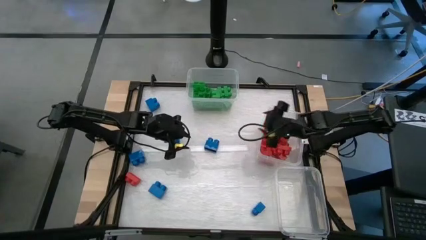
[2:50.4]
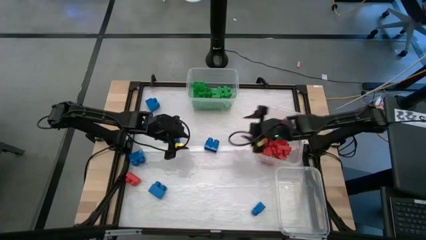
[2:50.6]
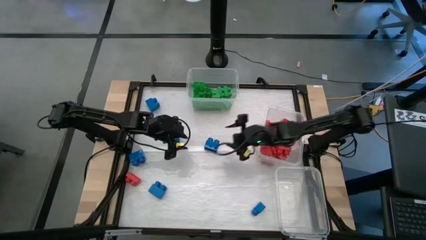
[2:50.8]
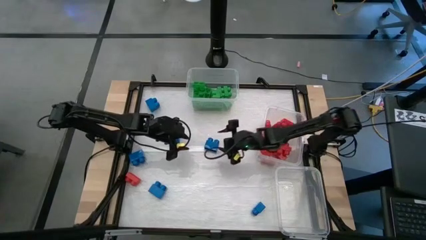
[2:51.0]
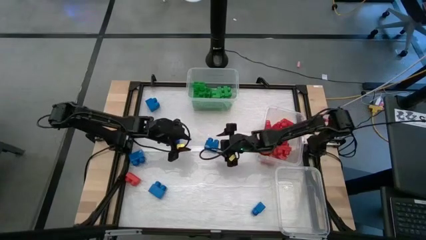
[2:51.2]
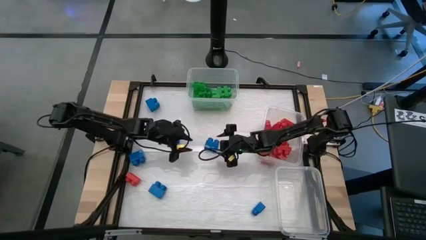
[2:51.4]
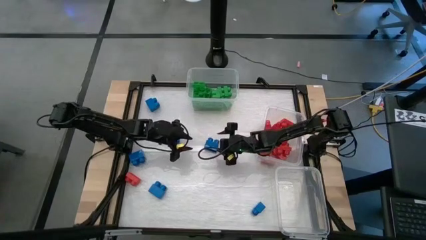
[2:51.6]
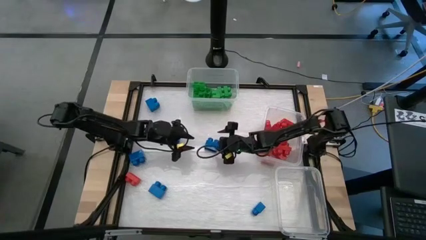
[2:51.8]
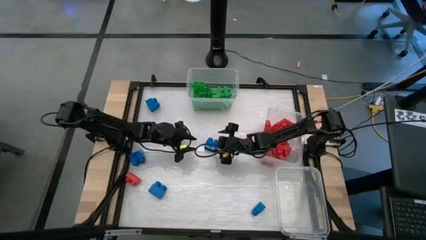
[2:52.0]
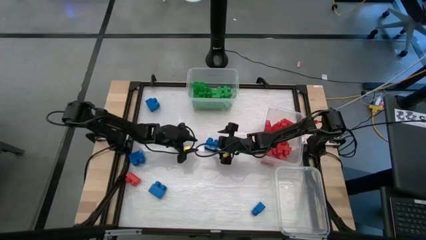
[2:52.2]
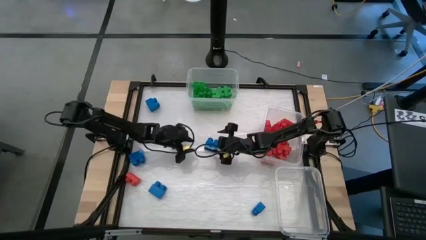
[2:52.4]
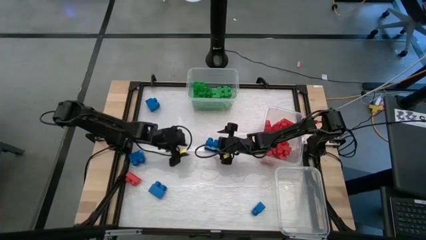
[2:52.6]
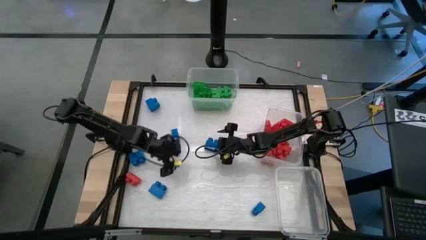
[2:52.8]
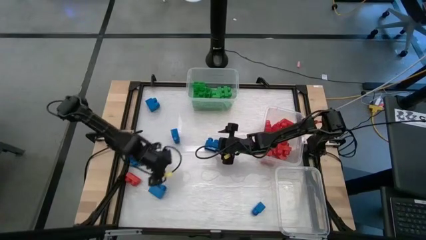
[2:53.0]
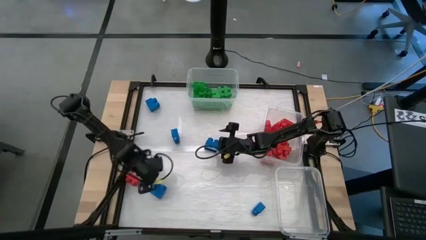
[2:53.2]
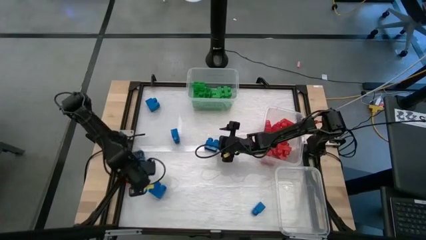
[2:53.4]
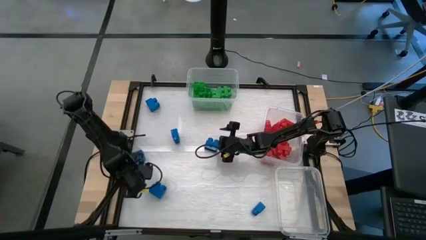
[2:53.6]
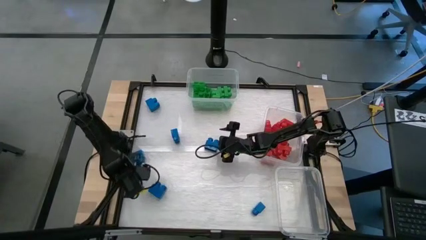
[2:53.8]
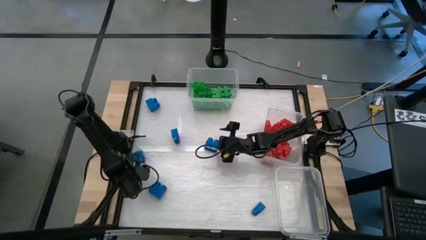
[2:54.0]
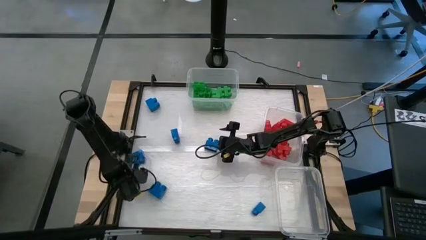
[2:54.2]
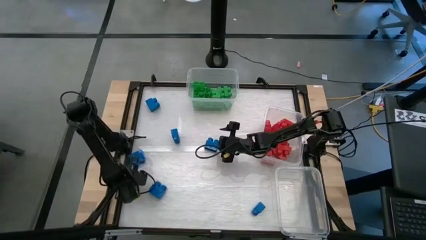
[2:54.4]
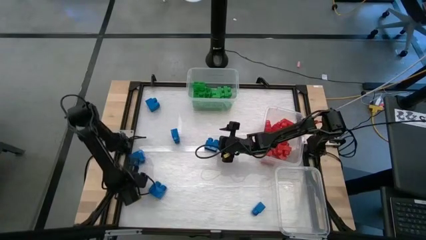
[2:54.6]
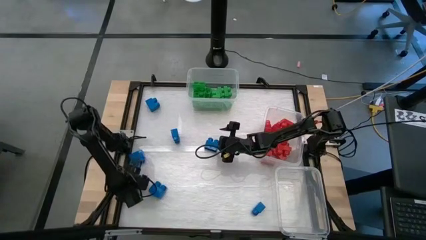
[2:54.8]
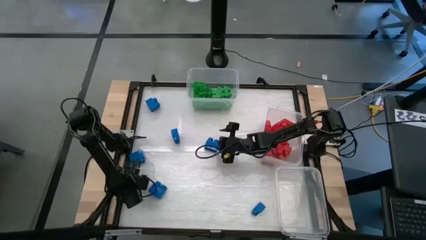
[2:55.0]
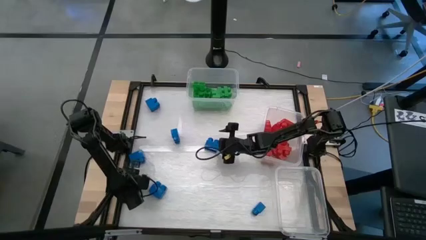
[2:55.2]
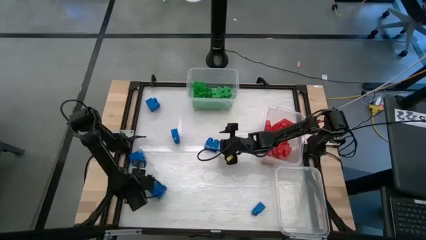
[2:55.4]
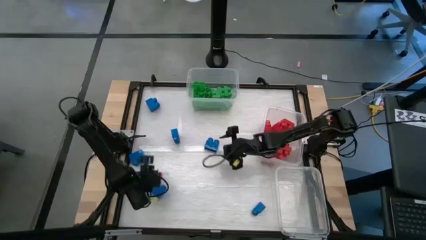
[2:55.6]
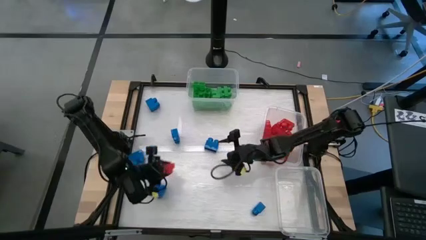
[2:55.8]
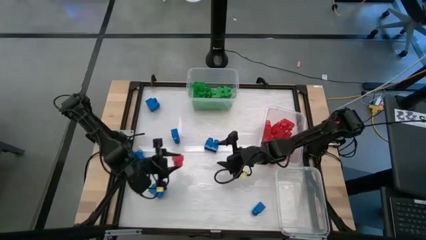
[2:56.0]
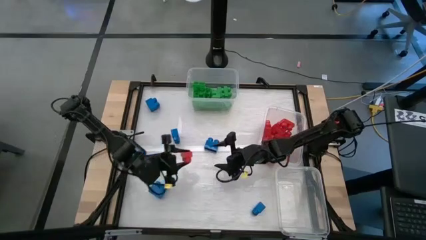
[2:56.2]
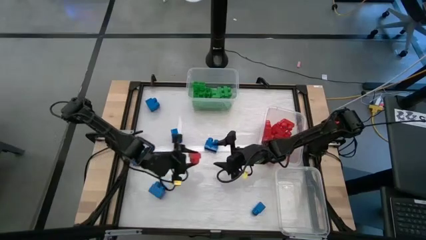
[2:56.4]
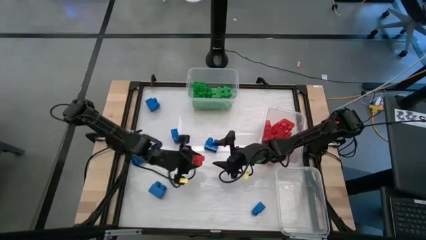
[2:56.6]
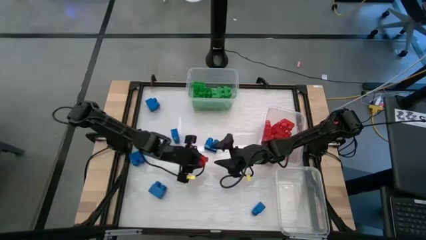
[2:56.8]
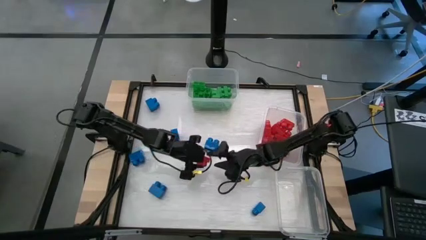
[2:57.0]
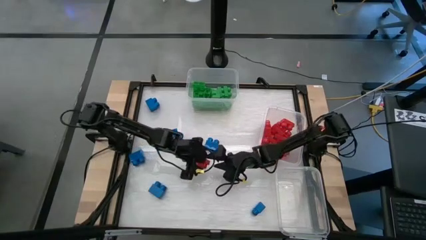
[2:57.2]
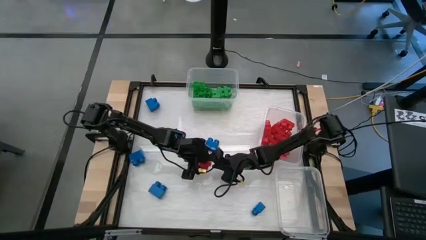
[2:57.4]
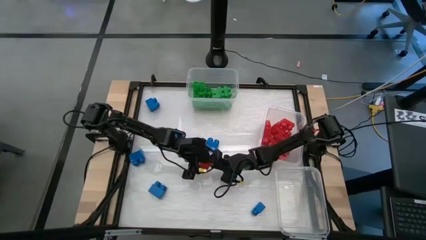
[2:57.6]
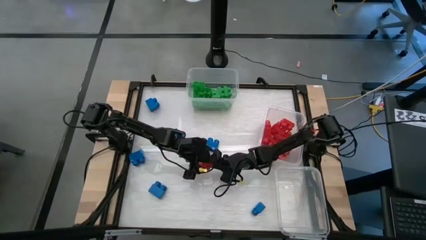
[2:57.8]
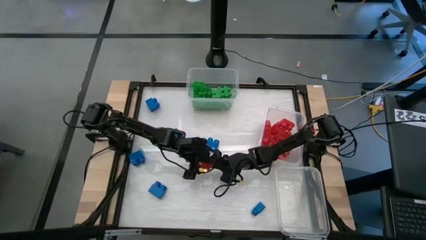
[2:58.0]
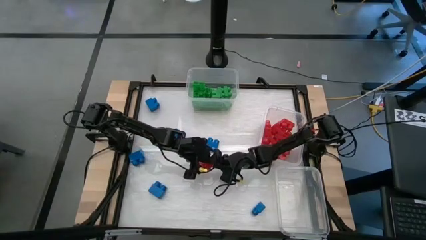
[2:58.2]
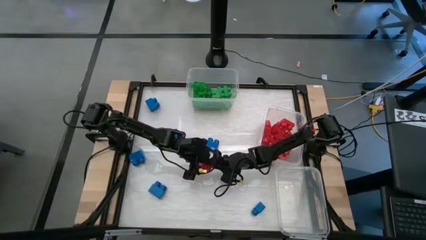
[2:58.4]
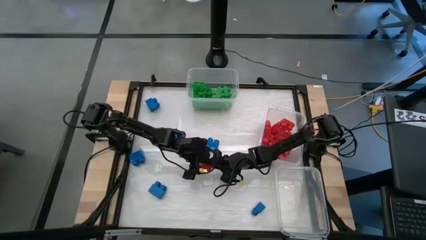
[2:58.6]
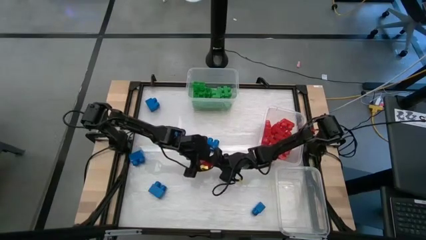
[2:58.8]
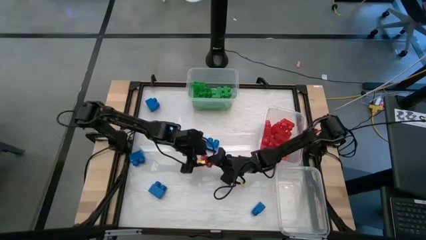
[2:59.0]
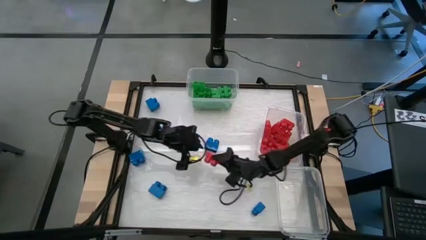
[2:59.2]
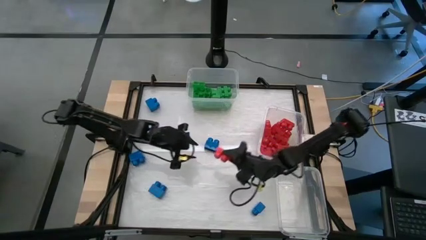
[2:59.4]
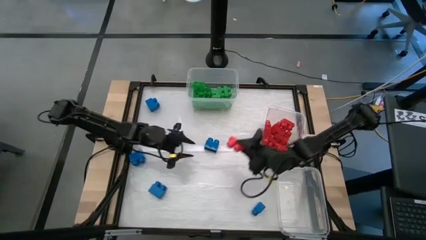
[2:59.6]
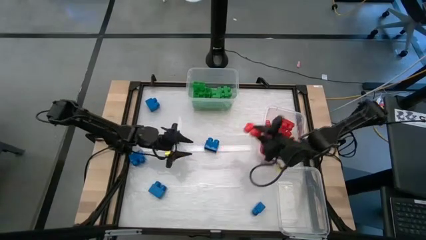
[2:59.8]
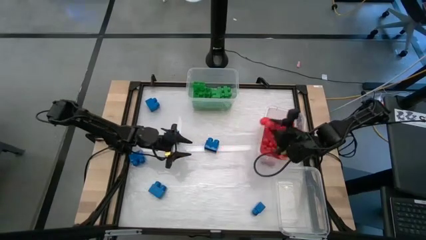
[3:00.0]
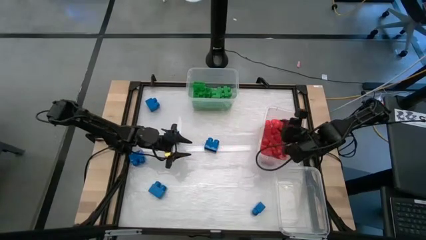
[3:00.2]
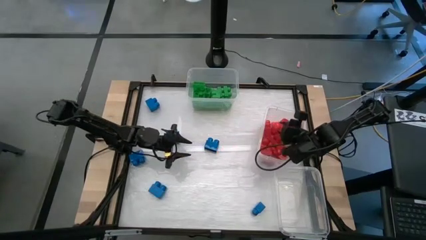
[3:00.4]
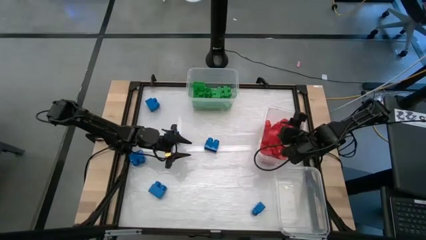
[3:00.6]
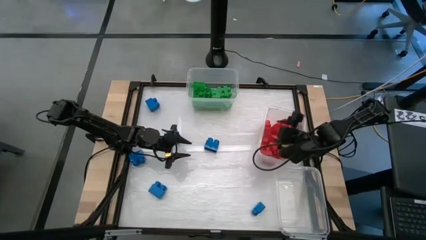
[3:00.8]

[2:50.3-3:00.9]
Task: Sort blocks
Put the red game piece into the middle right transparent bin

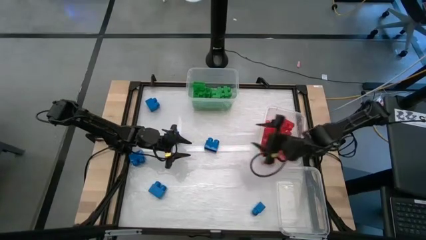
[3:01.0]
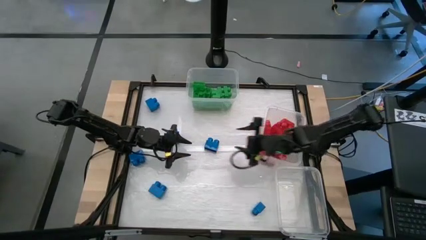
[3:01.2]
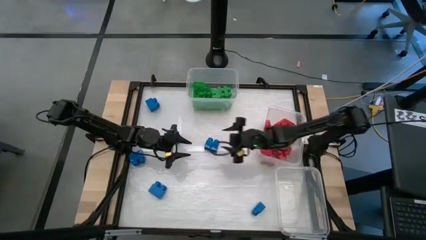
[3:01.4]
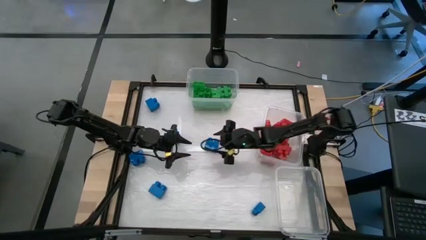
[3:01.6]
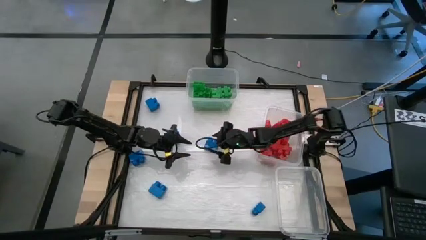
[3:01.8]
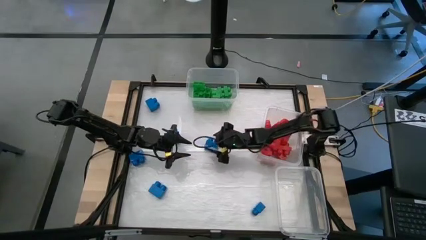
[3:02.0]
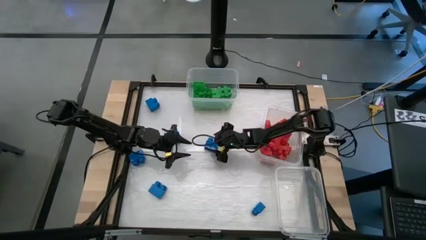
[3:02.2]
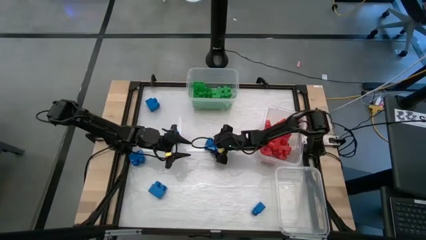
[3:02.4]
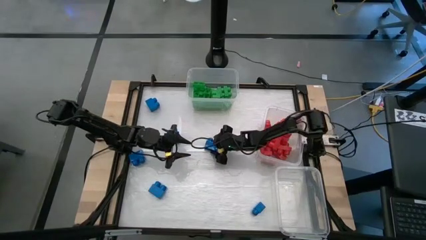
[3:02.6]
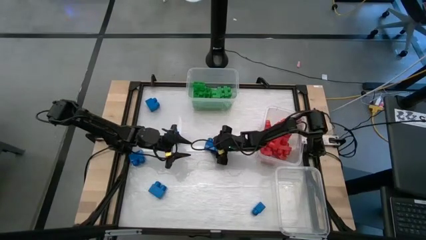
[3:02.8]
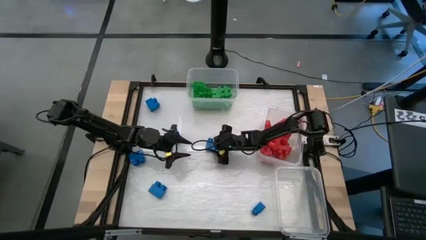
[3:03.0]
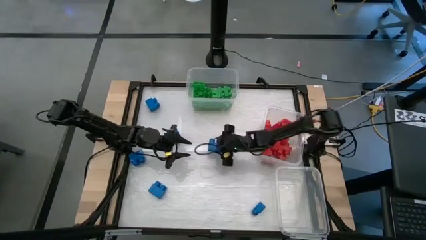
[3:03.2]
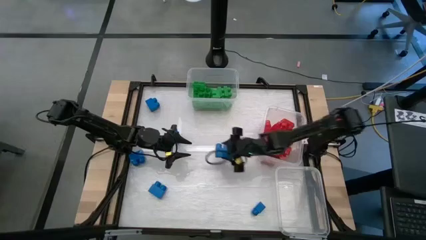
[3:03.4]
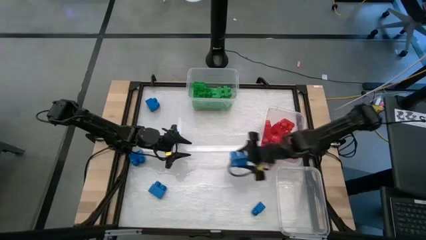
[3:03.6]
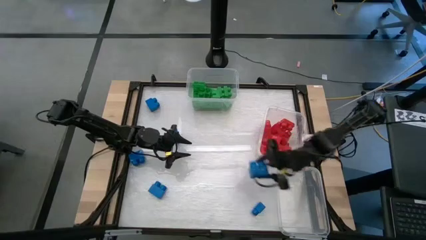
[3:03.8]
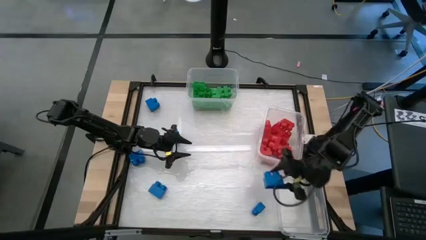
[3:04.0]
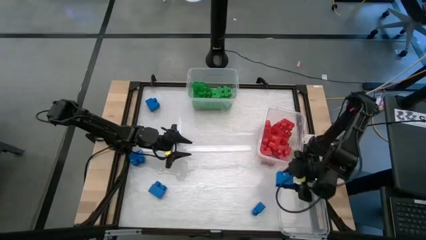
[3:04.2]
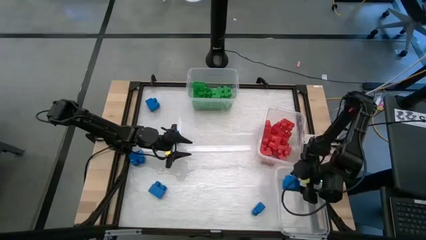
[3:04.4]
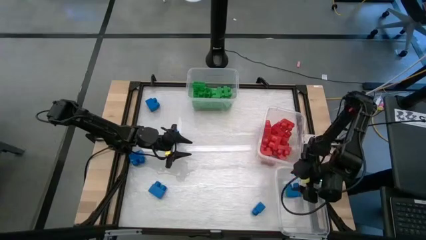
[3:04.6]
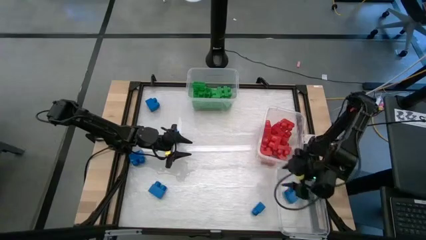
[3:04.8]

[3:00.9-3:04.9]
Put the blue game piece into the bottom right transparent bin
